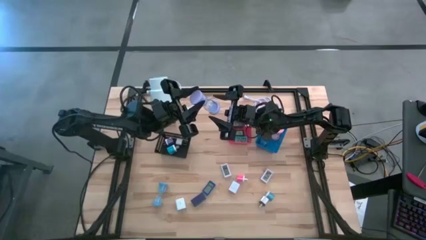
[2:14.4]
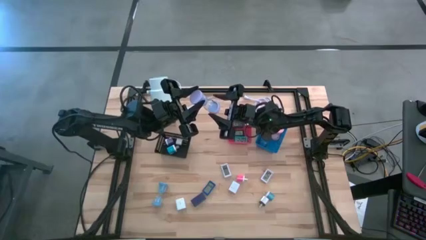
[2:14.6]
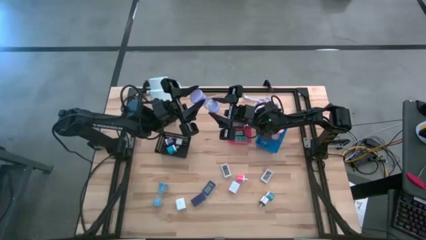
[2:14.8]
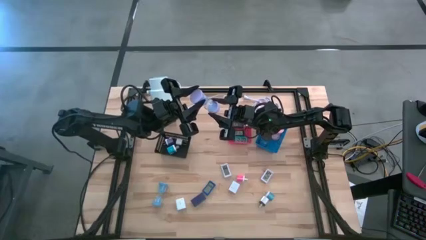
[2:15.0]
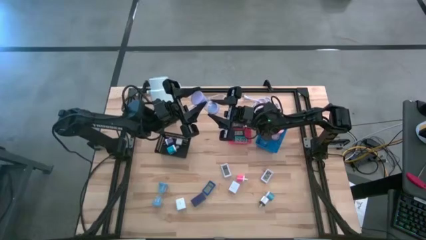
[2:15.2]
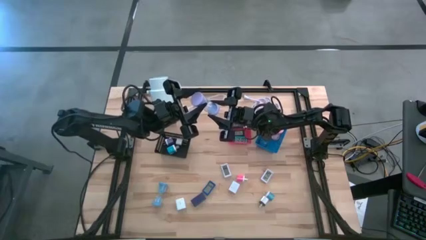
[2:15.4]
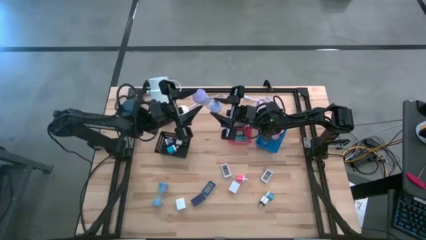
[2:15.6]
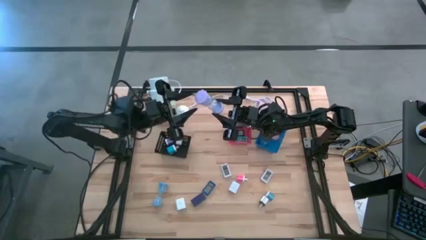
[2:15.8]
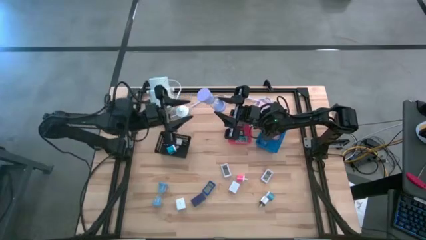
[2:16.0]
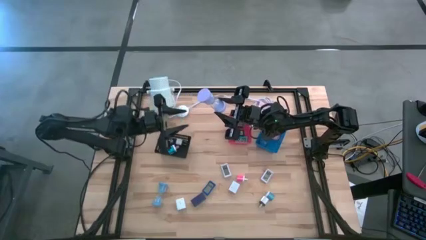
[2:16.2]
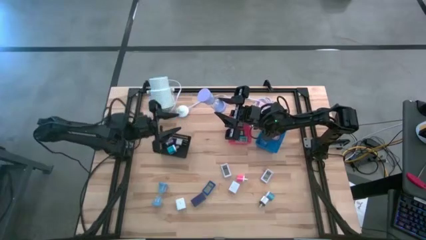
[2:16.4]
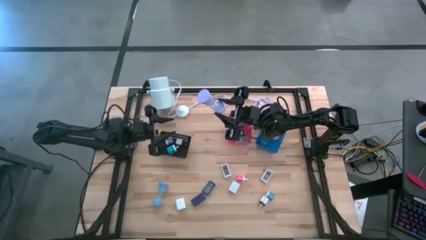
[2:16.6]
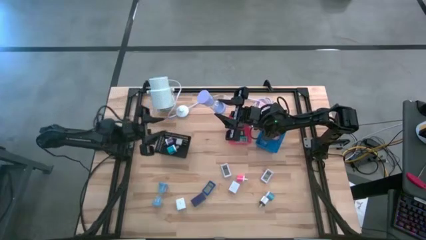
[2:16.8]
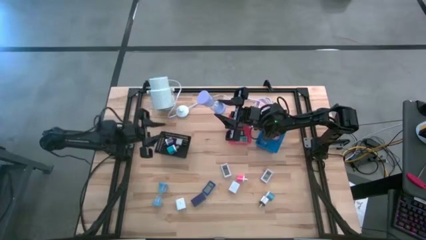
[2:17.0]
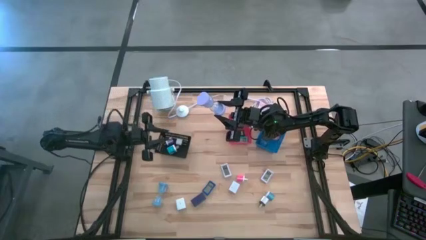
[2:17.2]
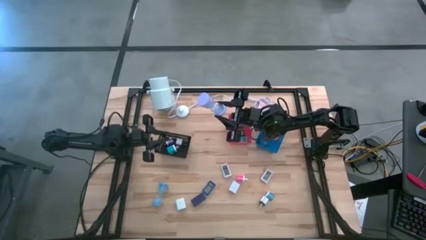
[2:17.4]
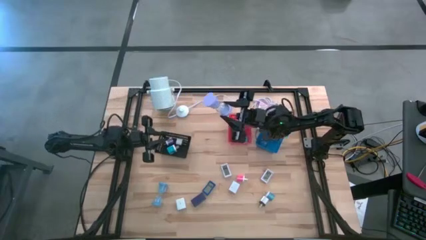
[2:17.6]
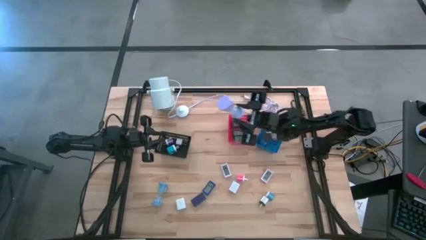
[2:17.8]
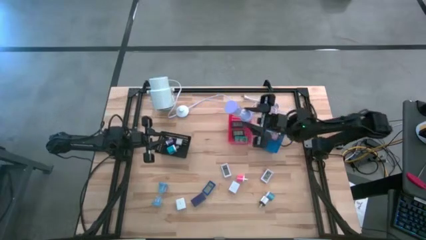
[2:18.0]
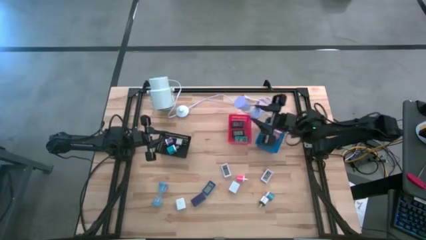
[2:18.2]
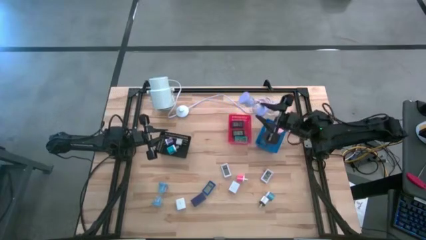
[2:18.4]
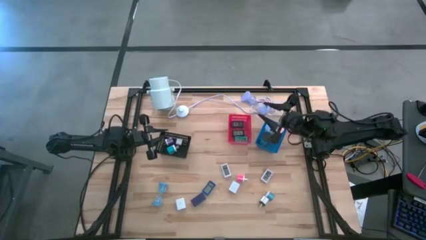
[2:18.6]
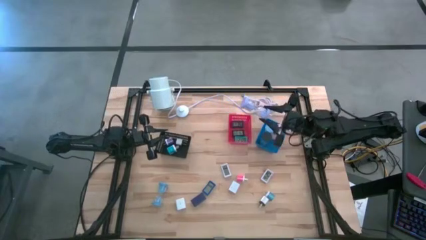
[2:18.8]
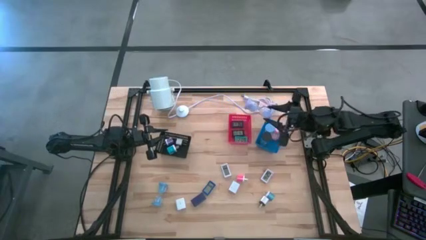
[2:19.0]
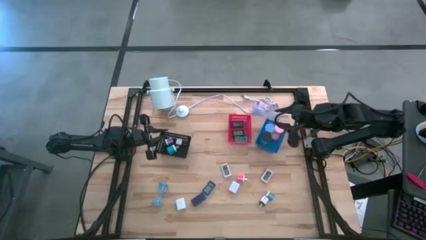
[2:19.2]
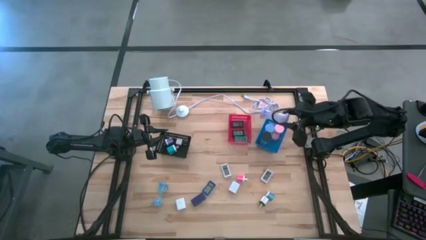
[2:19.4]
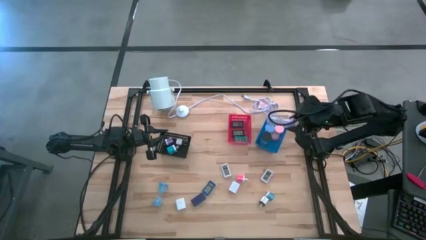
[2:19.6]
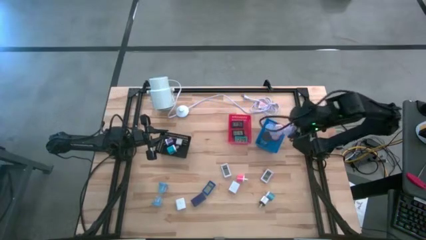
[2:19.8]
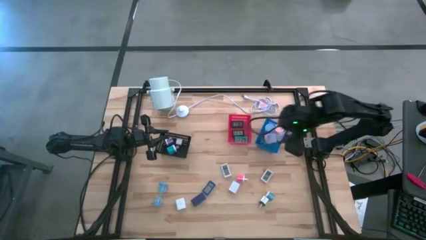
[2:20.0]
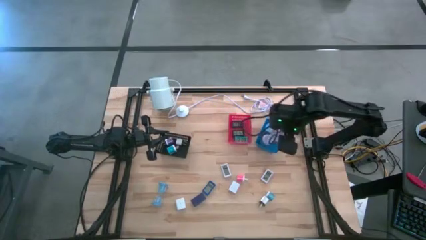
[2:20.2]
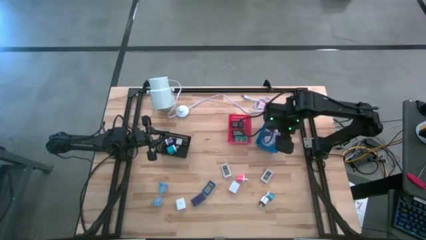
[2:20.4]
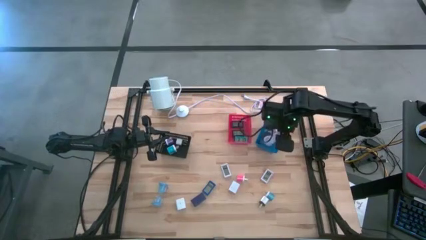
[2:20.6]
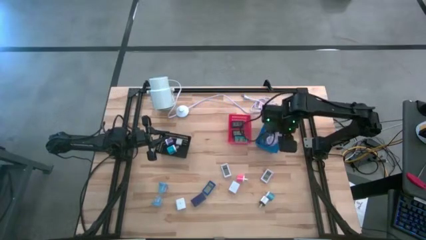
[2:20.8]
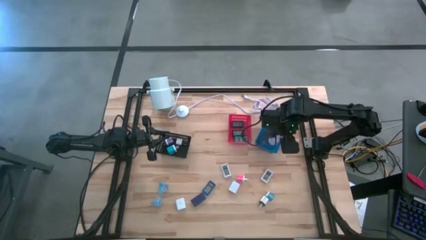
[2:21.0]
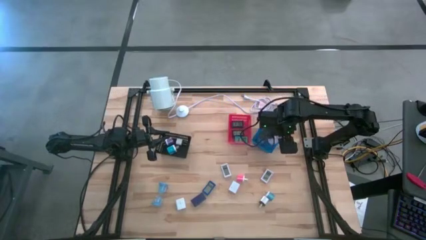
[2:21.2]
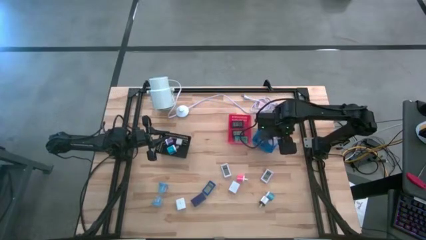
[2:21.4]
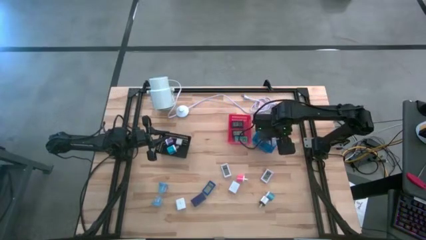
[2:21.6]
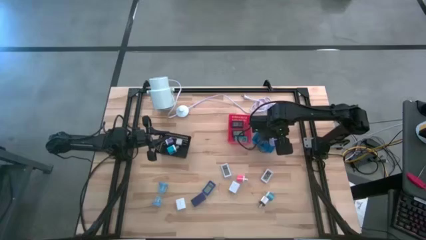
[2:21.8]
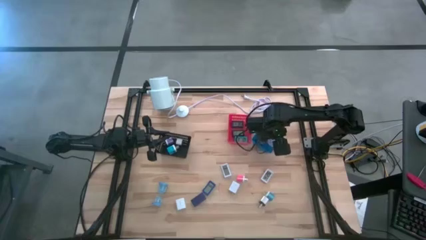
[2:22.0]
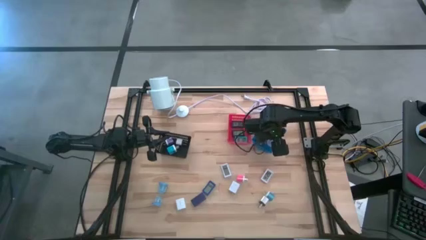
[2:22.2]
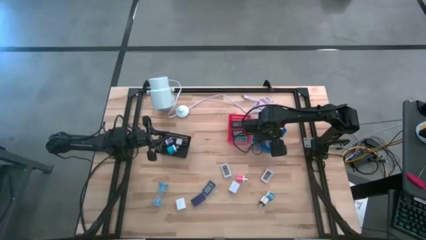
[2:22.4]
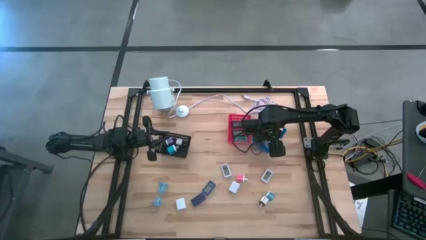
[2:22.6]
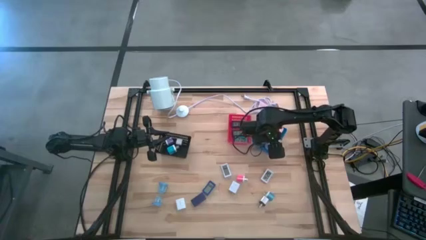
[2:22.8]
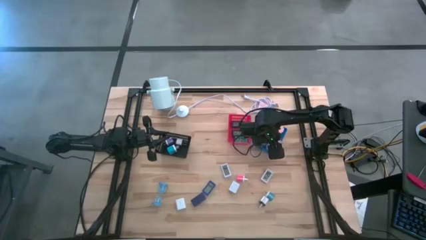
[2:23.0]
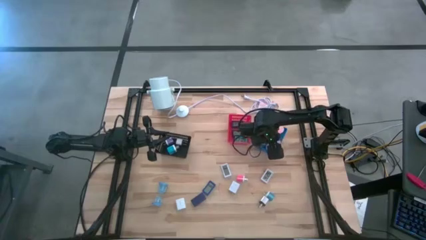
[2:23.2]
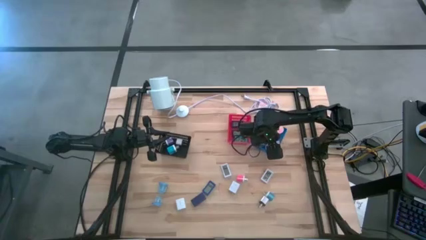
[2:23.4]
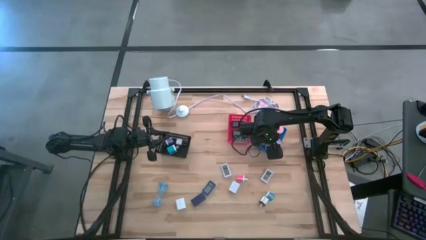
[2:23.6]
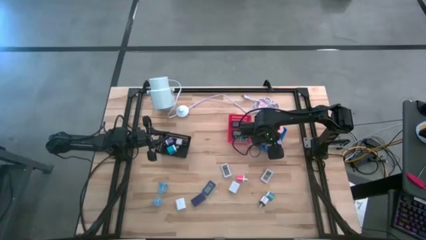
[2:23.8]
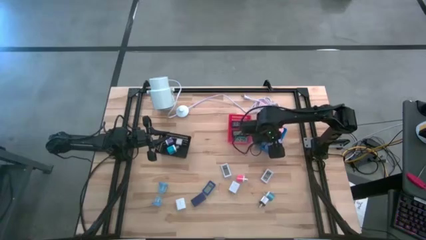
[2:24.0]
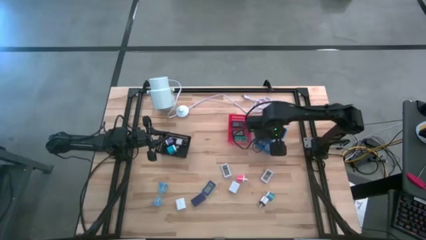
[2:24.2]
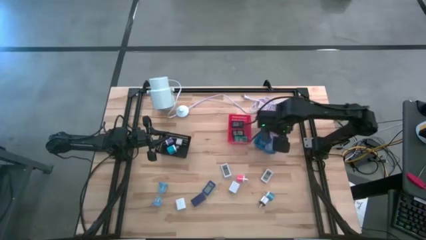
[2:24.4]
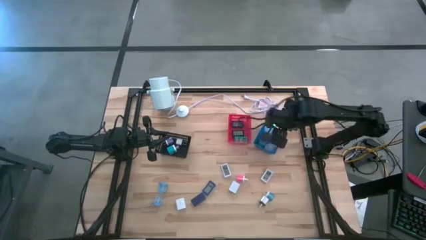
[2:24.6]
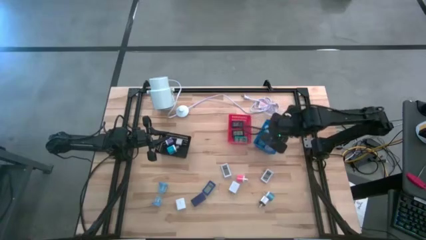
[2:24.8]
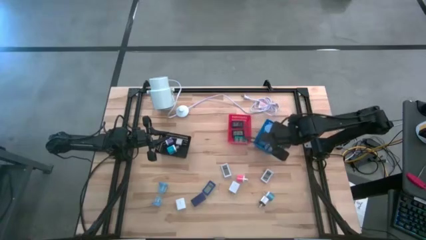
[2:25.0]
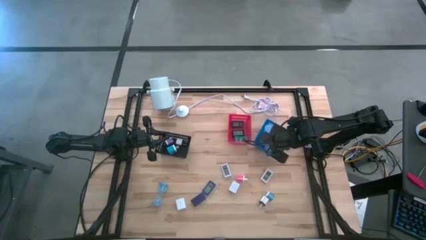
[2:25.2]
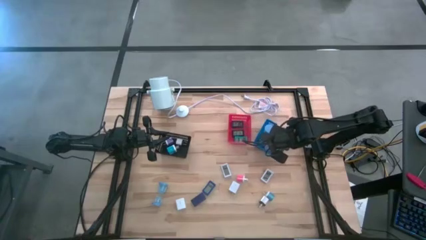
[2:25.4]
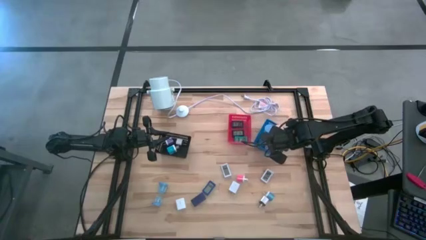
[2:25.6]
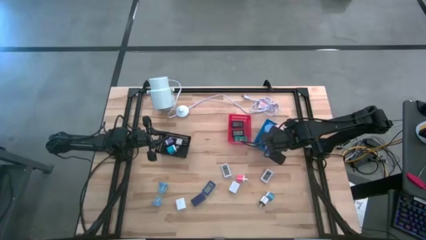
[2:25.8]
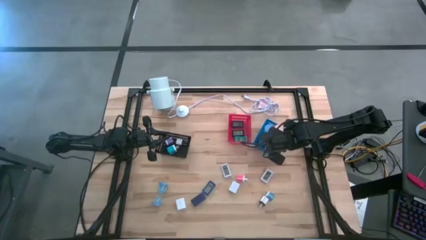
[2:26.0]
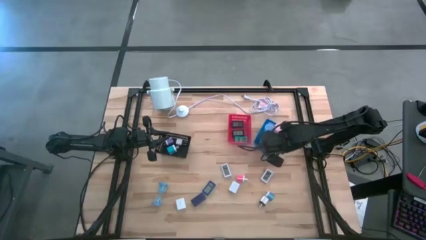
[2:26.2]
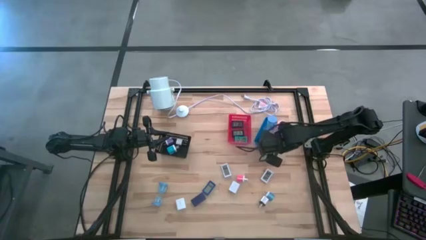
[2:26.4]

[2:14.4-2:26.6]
Task: Pick & Place Office items
Put the violet hourglass into the blue bin

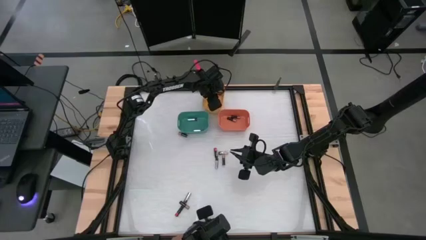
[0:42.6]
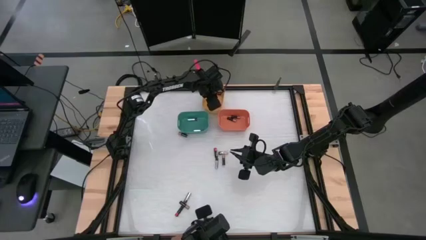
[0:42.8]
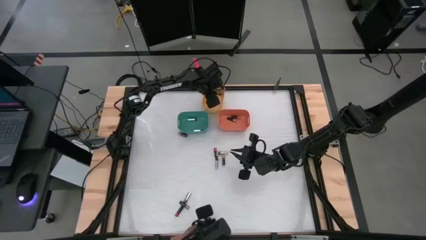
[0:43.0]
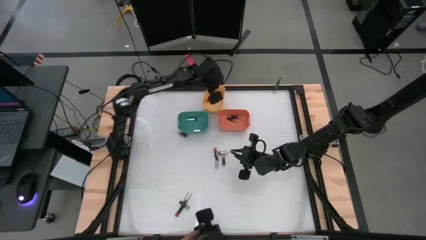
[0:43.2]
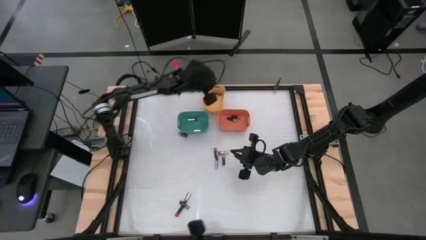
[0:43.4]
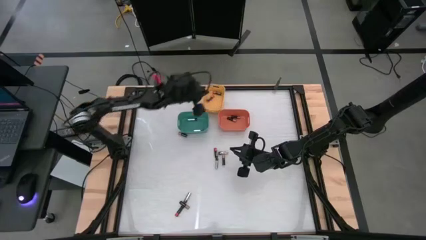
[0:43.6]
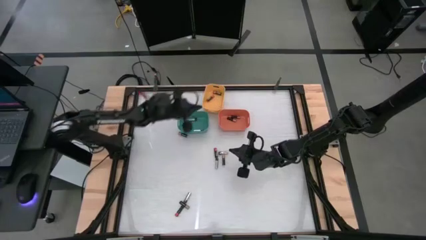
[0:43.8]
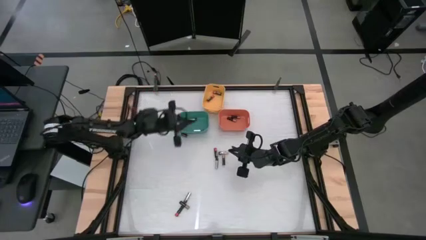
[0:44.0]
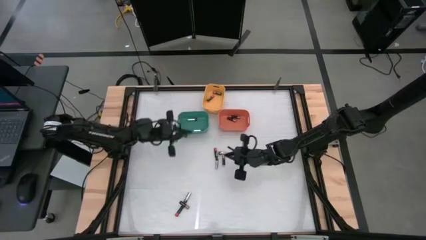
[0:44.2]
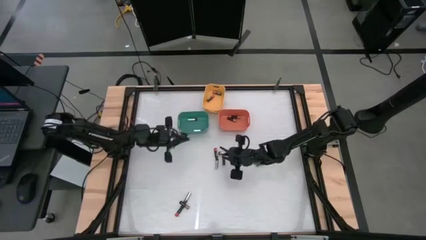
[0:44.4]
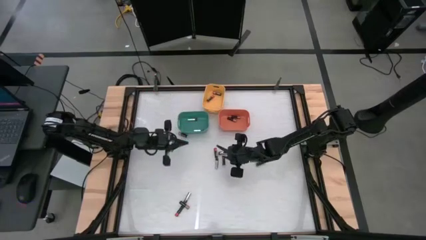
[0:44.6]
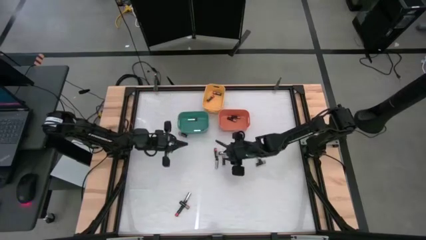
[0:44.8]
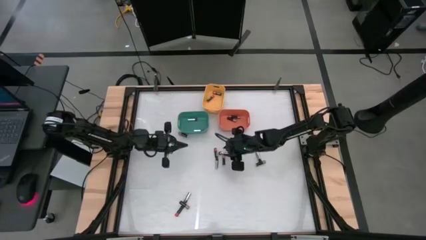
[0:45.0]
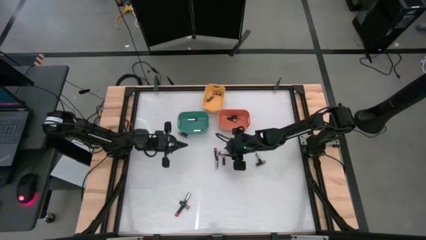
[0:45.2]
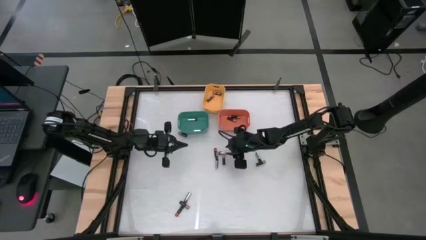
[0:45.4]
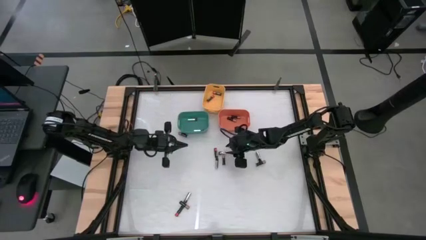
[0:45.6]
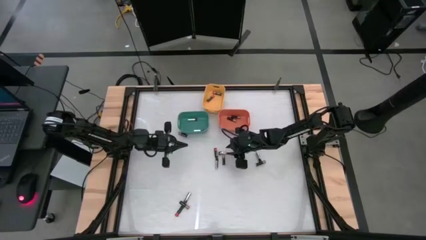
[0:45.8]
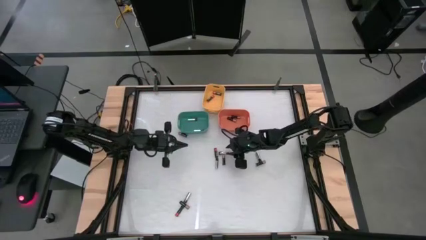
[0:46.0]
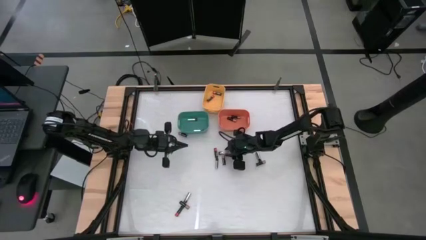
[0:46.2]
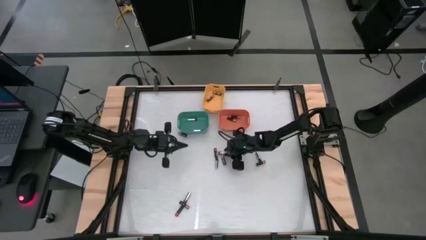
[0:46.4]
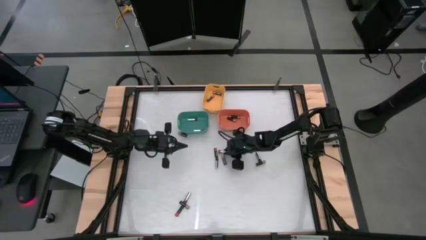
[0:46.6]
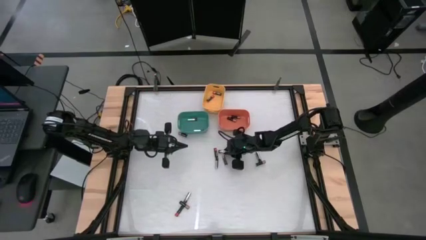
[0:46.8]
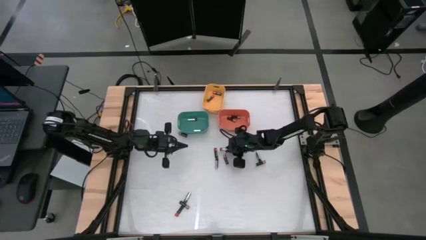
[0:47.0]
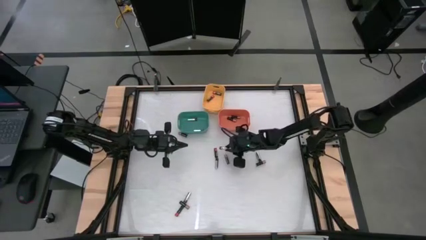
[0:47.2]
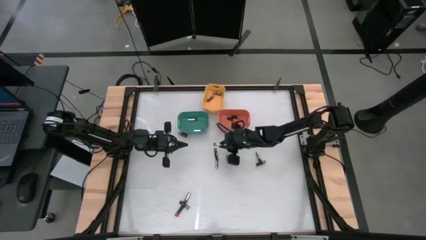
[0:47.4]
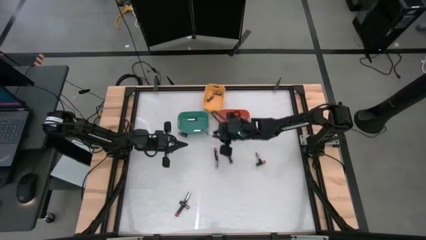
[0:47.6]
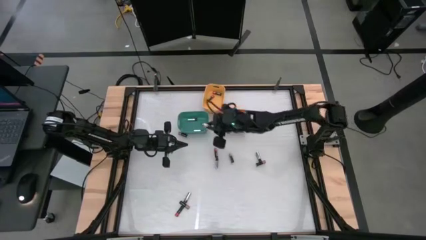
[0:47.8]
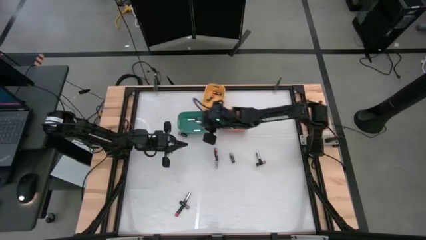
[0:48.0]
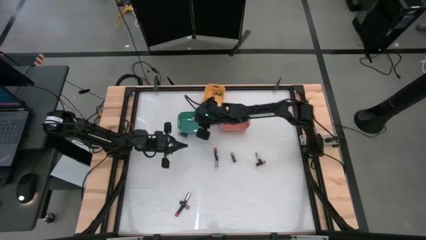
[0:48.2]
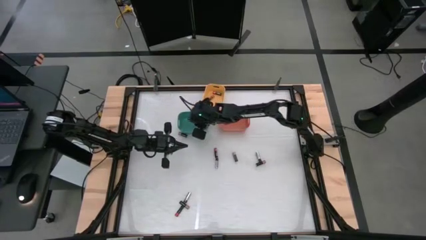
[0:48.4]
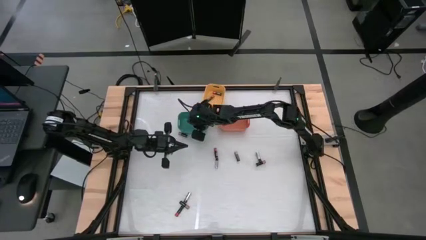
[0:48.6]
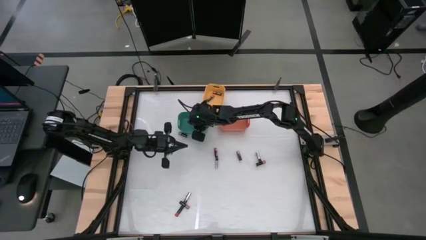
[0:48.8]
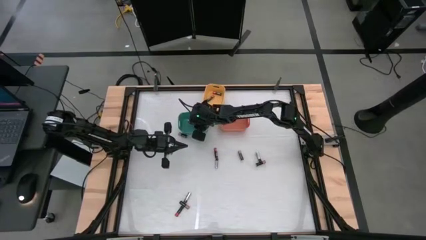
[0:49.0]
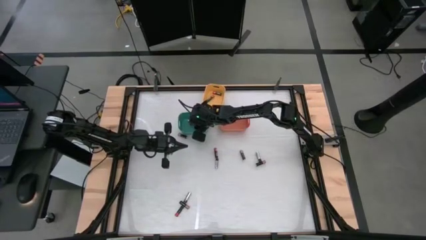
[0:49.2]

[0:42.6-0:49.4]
Task: Sort batteries
Put the silver battery into the green bin
